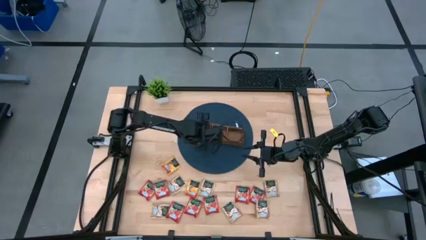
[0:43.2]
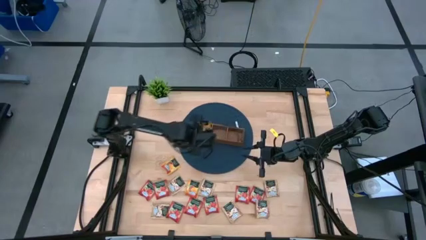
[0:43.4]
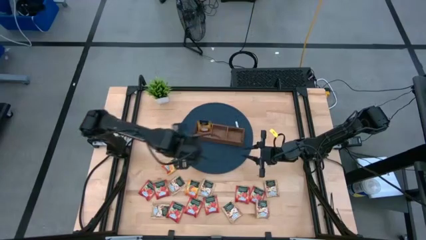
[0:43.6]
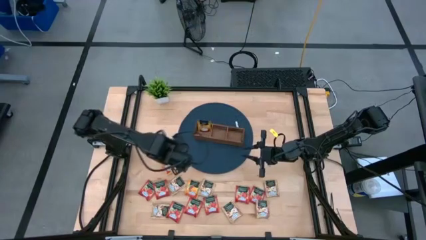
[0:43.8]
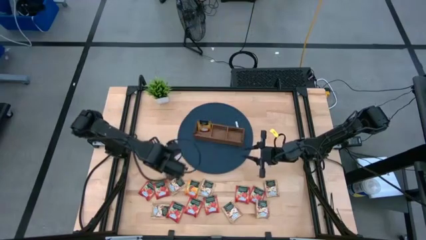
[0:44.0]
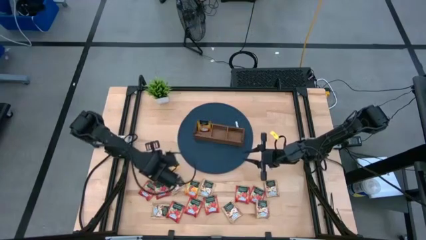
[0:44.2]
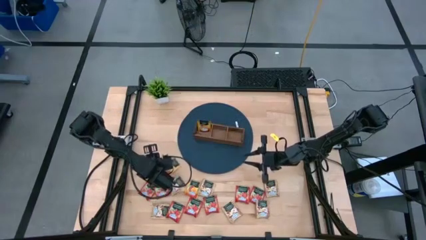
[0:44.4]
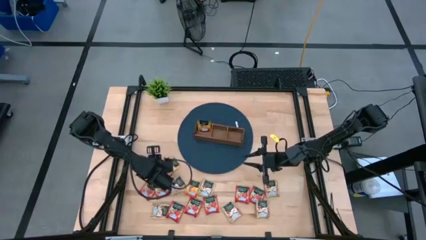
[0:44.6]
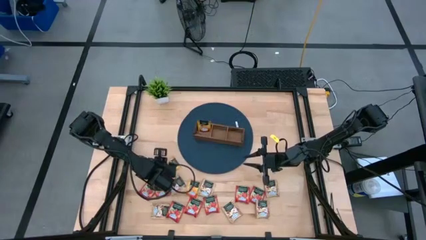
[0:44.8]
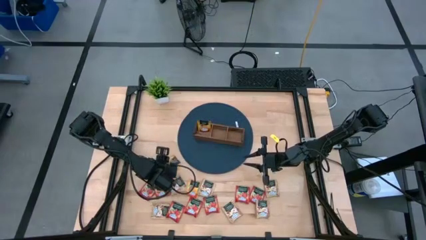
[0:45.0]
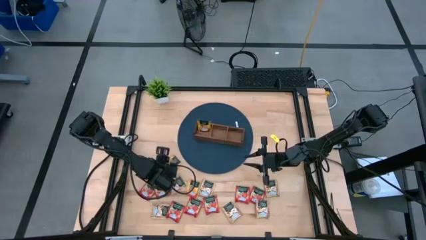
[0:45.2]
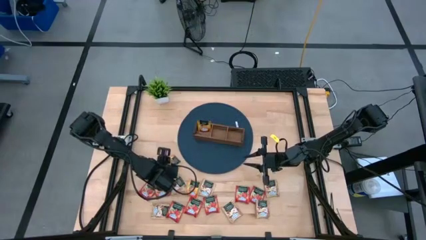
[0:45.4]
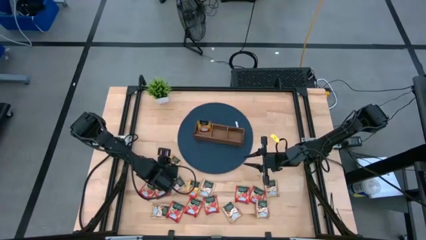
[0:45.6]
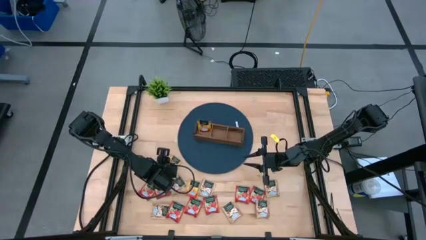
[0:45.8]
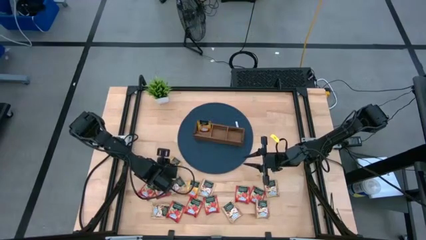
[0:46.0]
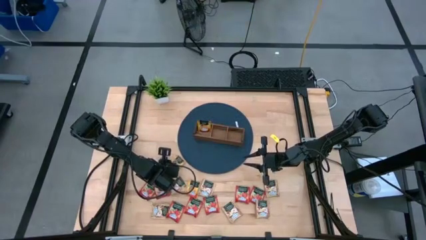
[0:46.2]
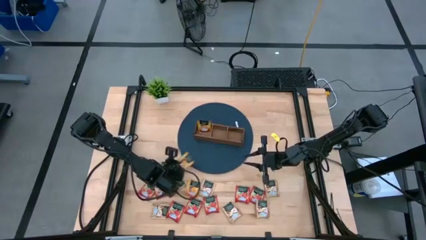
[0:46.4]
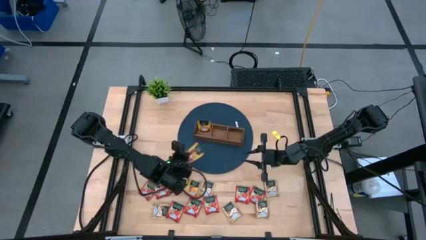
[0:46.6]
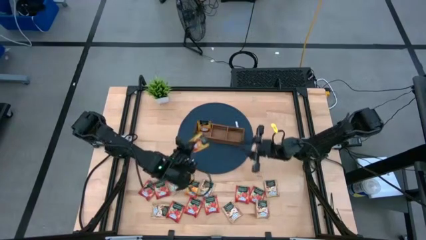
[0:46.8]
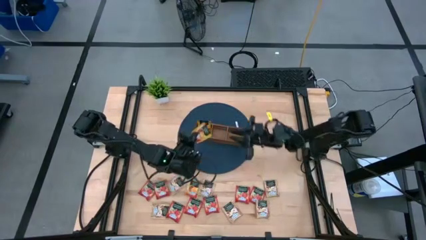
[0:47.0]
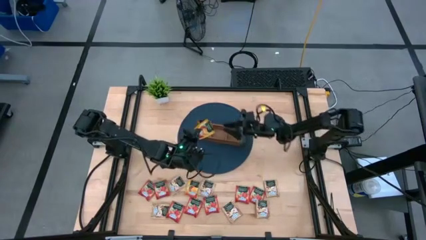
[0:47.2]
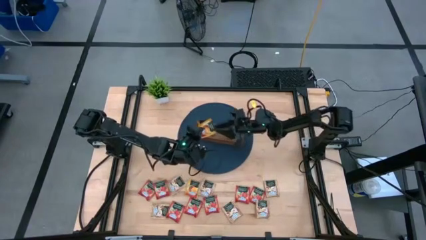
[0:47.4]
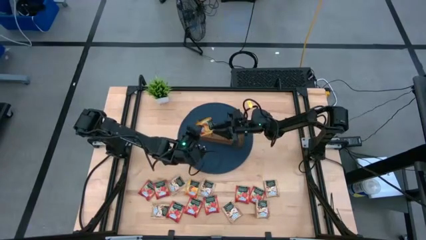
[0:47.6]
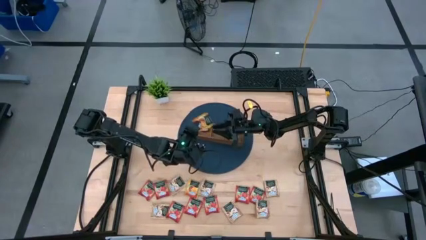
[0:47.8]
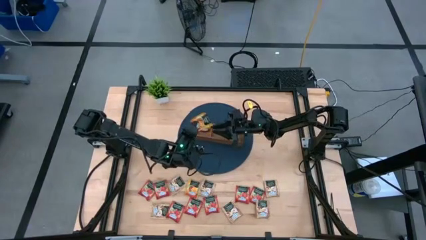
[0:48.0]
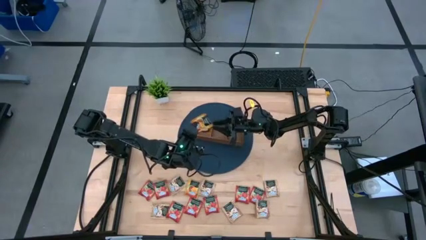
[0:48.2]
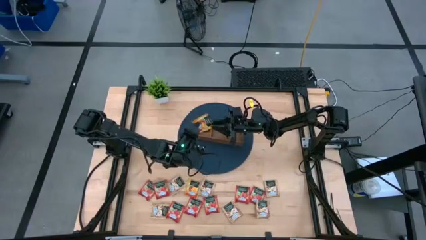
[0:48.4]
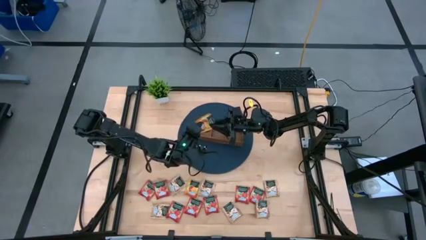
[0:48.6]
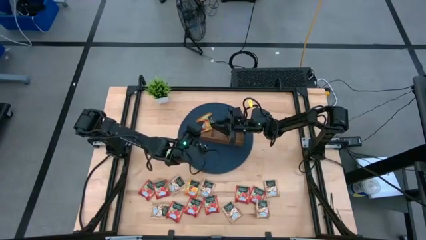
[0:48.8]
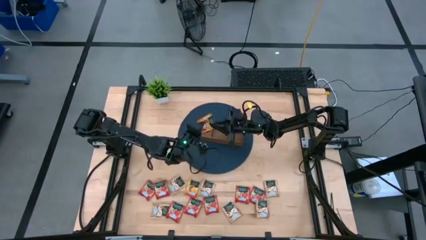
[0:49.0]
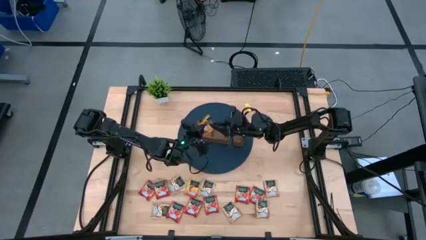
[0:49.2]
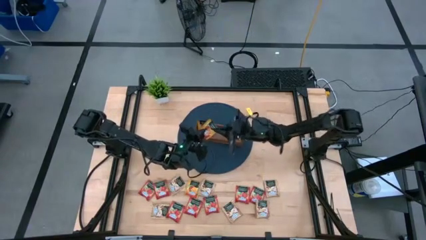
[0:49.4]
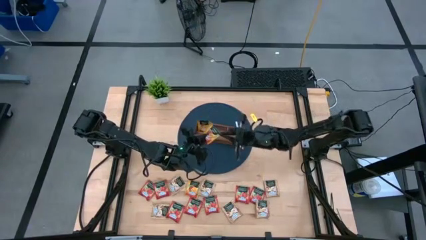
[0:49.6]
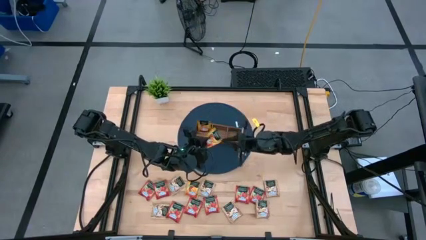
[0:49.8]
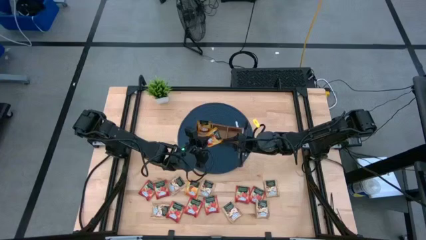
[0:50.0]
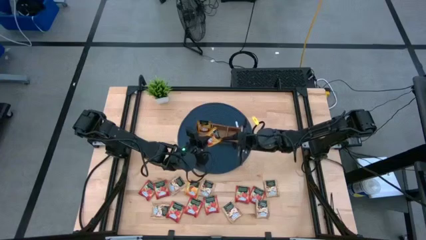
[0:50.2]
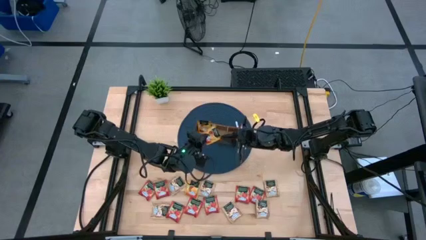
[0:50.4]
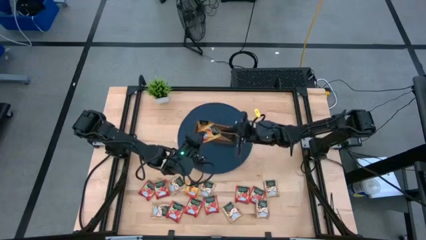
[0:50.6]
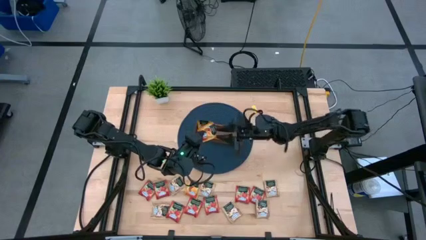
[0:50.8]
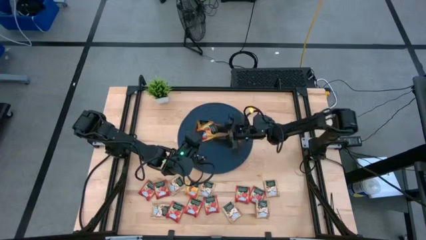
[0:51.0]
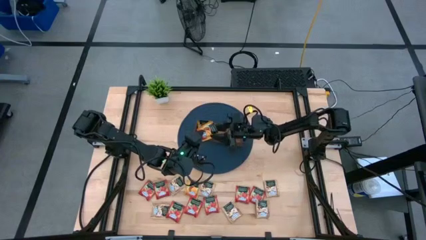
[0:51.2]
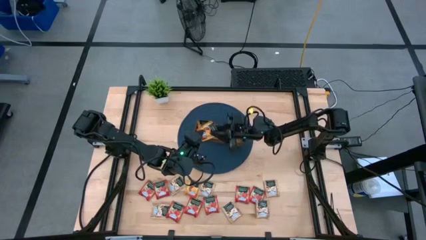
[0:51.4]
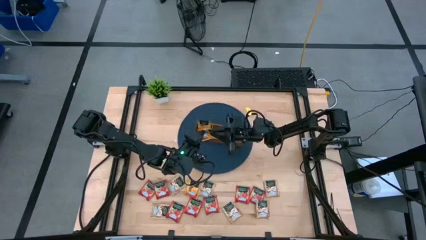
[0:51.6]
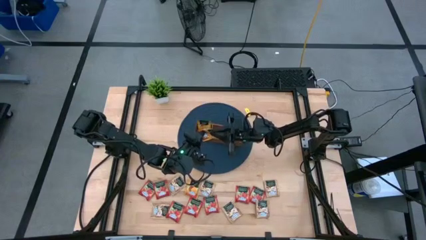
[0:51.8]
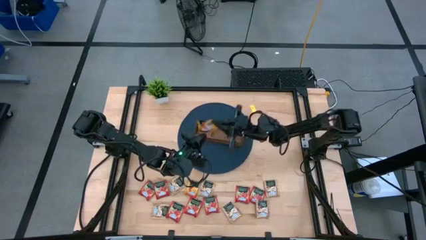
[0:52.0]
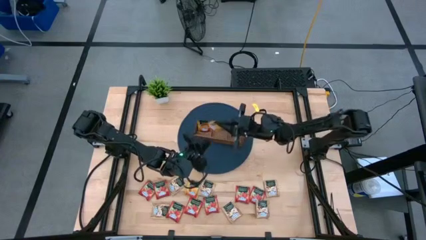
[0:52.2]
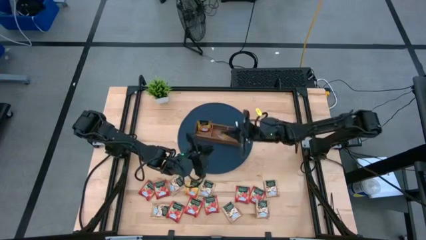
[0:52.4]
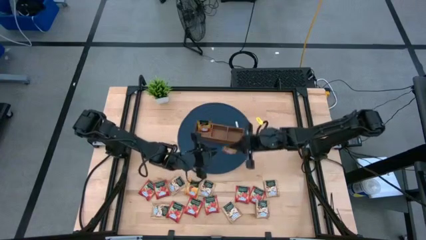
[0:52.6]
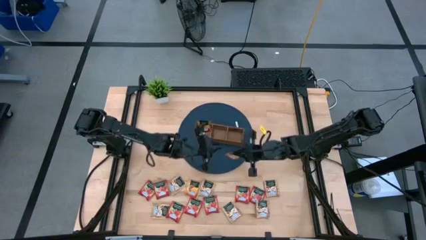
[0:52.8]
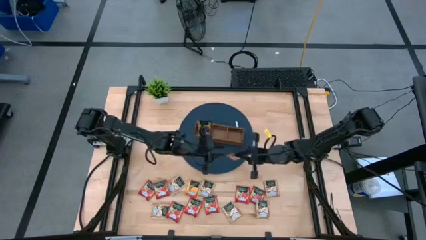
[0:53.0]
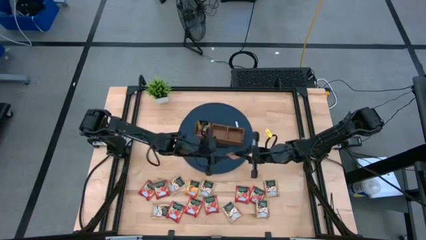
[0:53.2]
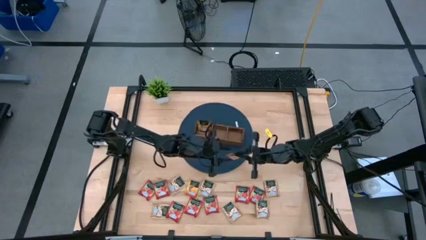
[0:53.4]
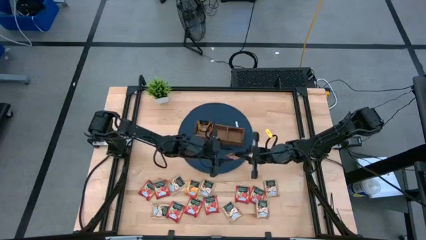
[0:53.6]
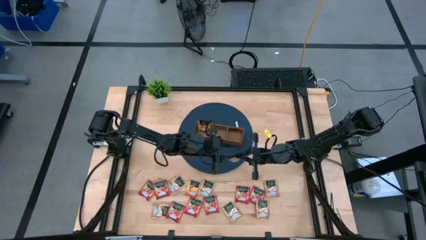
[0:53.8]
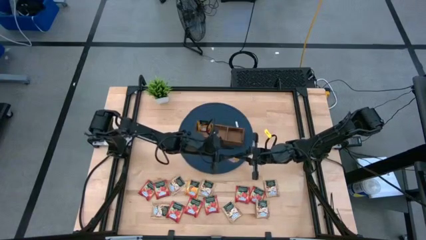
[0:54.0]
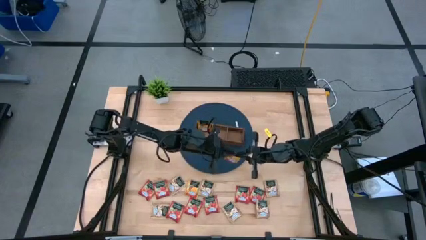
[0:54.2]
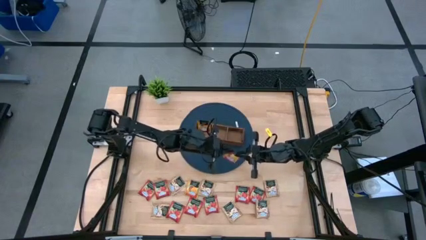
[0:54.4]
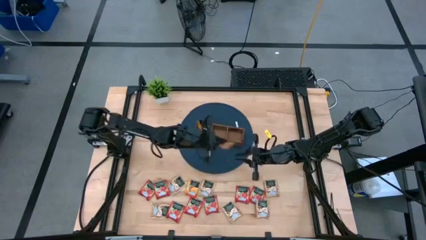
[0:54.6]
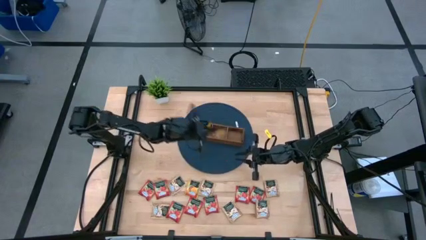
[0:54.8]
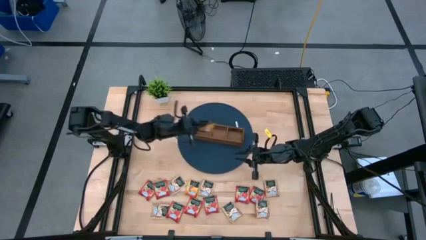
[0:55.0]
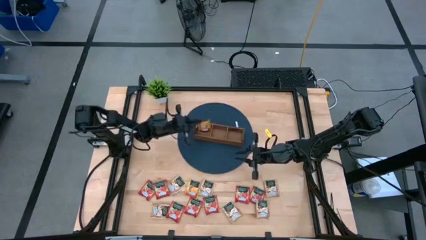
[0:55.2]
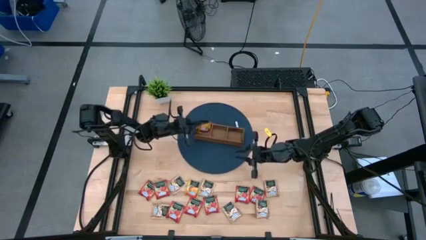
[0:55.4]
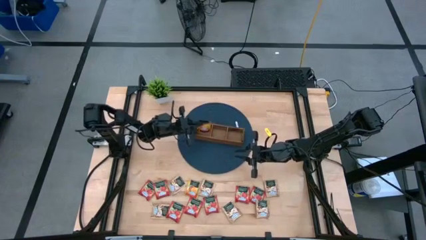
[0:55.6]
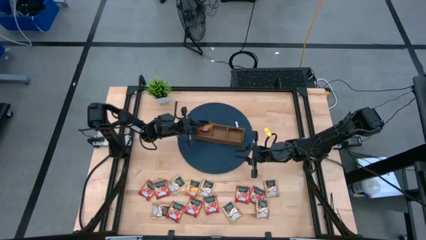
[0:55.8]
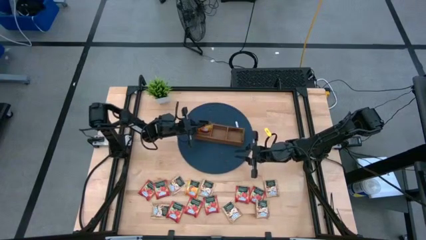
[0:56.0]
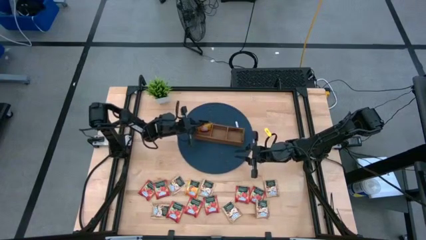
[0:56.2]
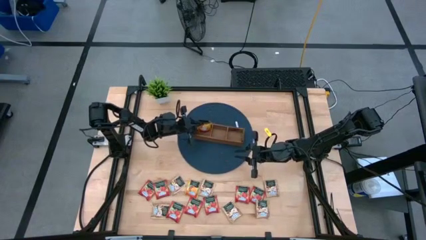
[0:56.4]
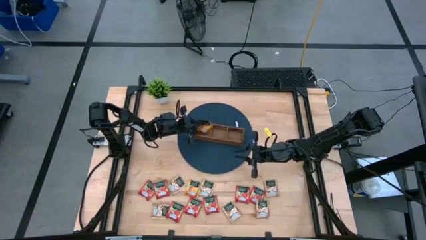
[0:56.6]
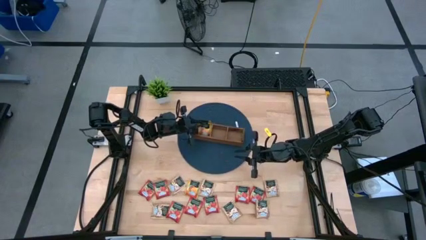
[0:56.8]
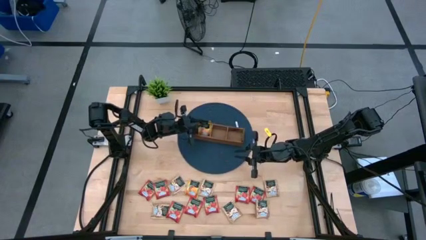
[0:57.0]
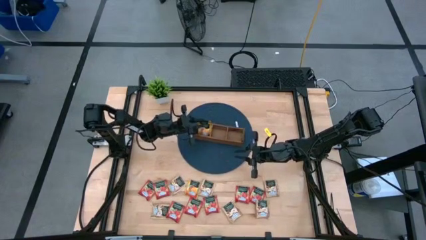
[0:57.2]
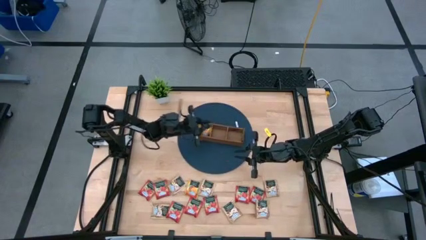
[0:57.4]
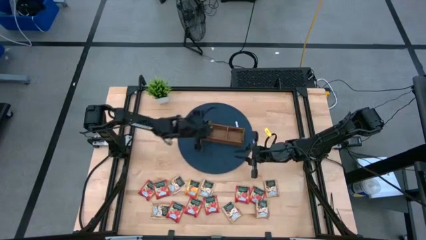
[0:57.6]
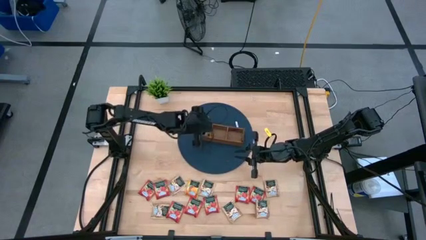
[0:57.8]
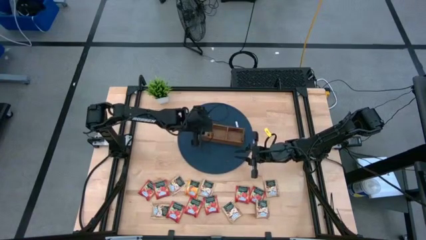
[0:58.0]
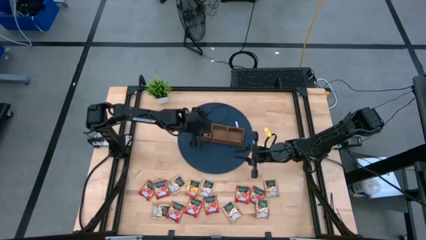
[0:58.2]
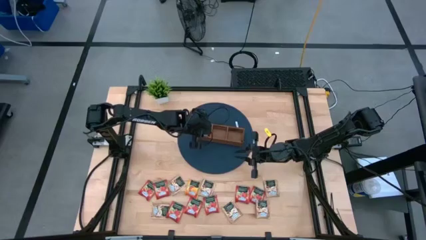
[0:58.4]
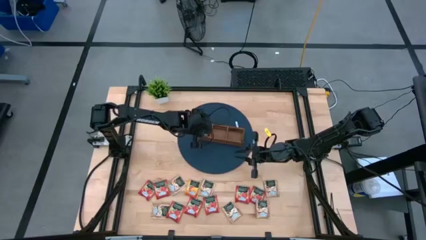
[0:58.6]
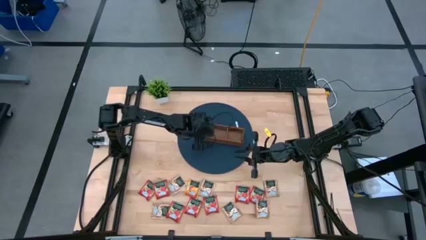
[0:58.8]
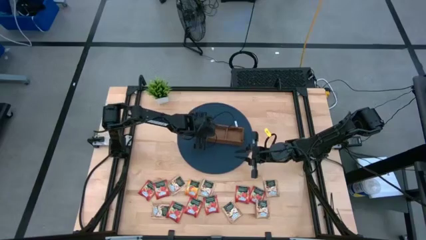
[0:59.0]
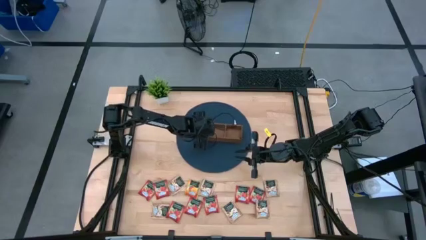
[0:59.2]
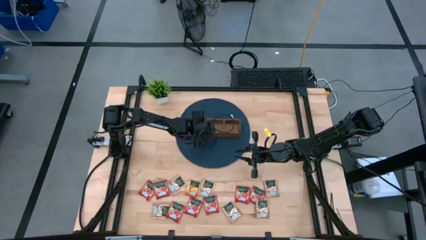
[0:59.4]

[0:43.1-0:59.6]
Task: Pick & Place Tea
Put the yellow tea bag into the left section of the wooden organizer
